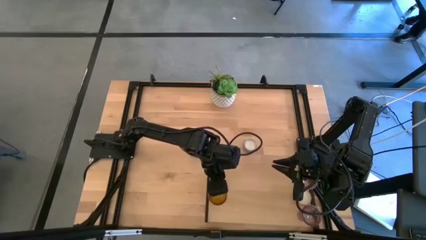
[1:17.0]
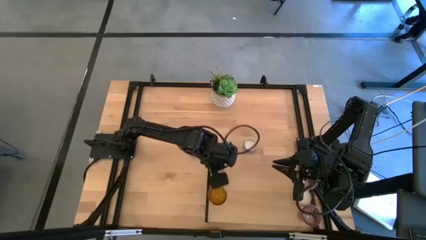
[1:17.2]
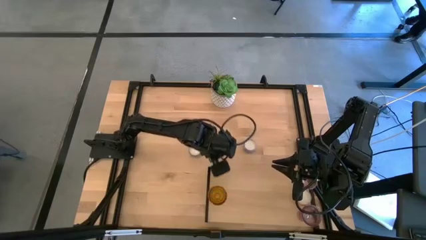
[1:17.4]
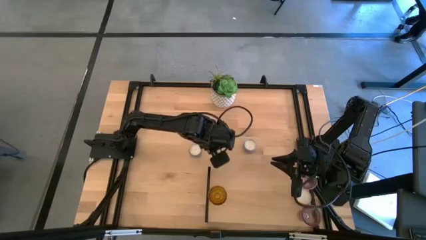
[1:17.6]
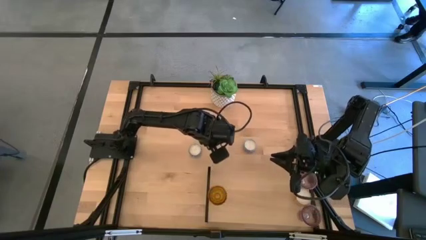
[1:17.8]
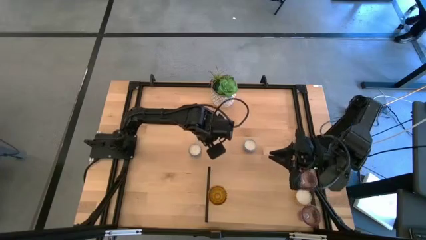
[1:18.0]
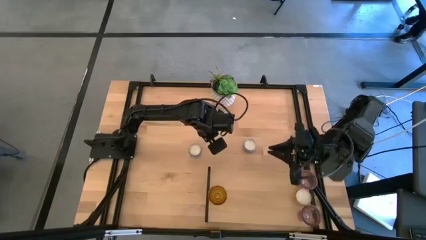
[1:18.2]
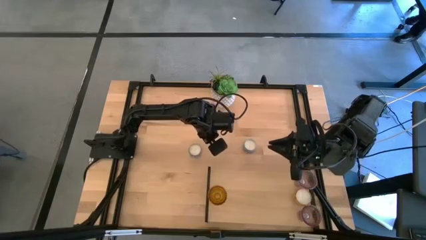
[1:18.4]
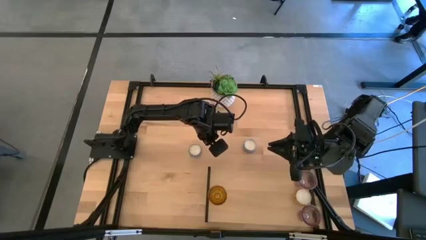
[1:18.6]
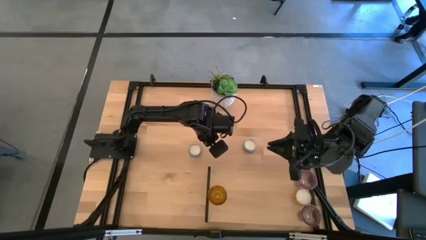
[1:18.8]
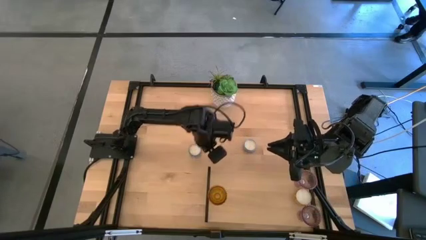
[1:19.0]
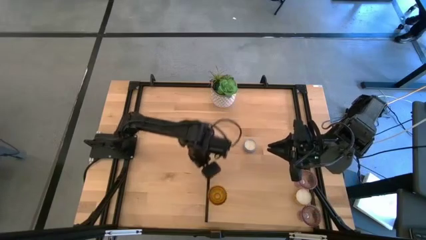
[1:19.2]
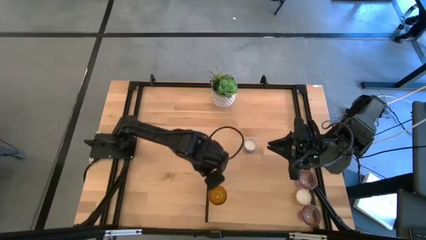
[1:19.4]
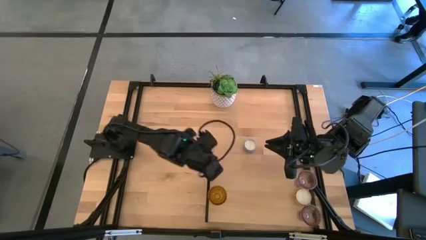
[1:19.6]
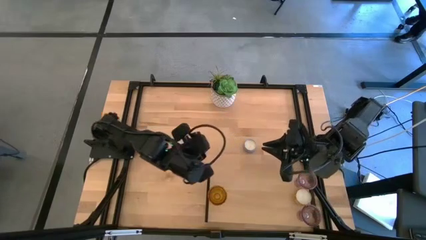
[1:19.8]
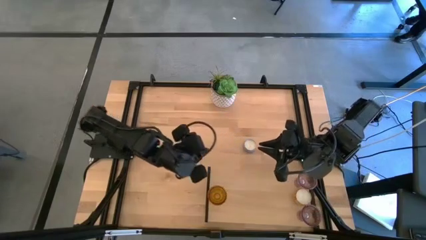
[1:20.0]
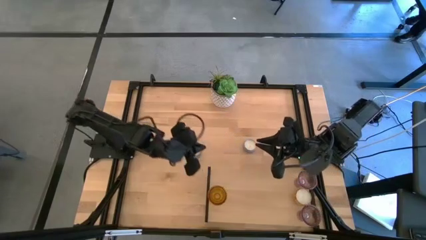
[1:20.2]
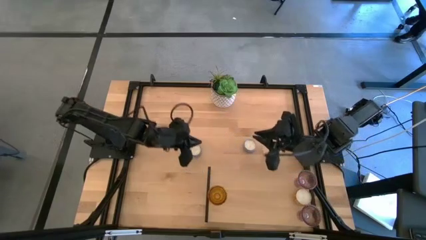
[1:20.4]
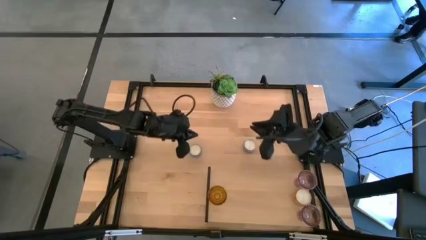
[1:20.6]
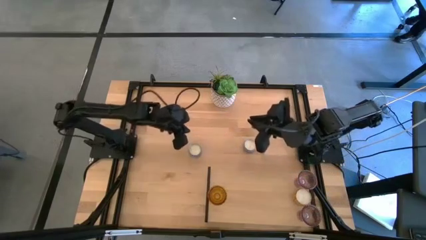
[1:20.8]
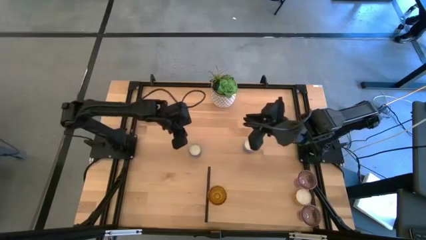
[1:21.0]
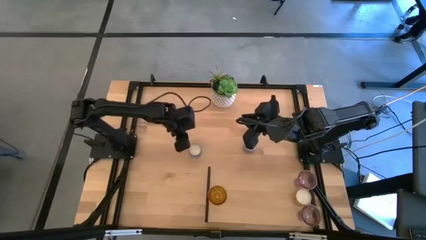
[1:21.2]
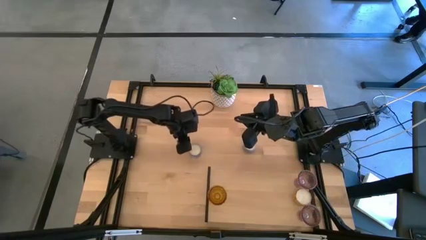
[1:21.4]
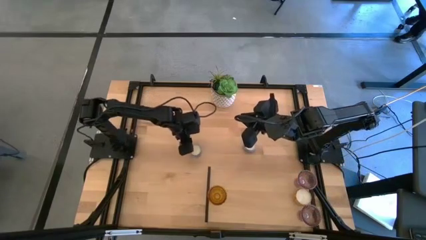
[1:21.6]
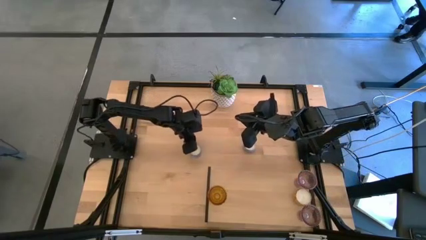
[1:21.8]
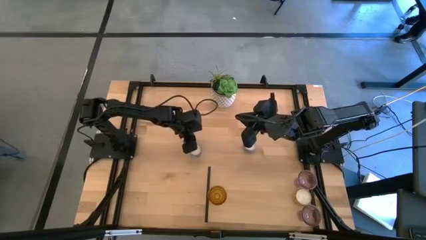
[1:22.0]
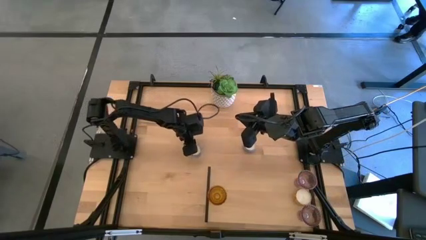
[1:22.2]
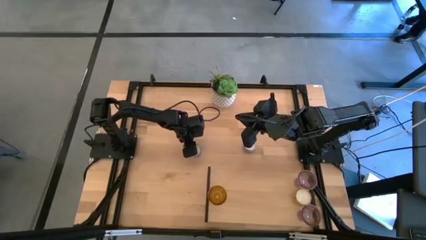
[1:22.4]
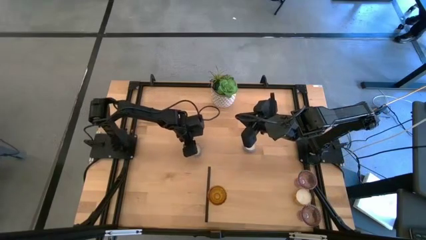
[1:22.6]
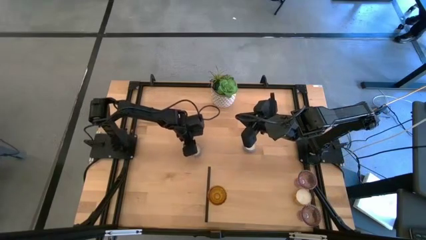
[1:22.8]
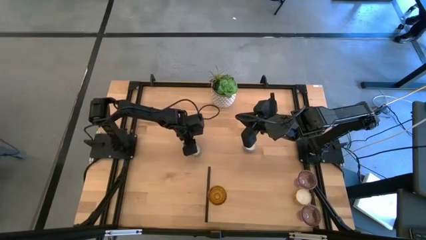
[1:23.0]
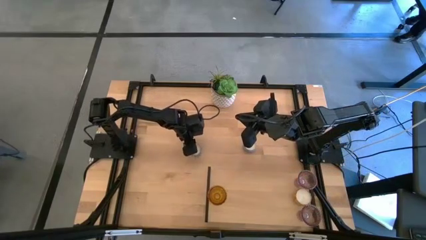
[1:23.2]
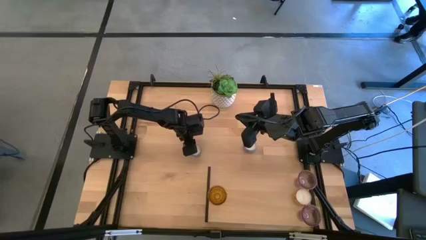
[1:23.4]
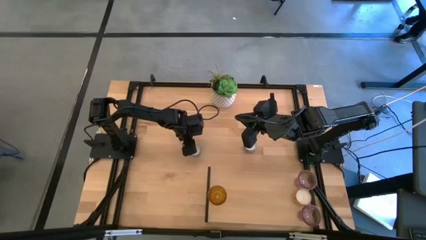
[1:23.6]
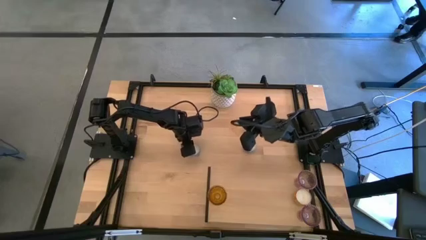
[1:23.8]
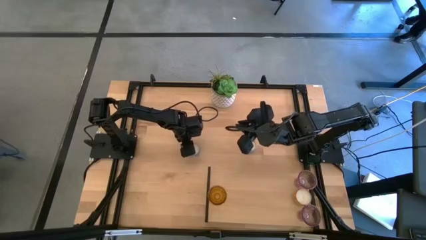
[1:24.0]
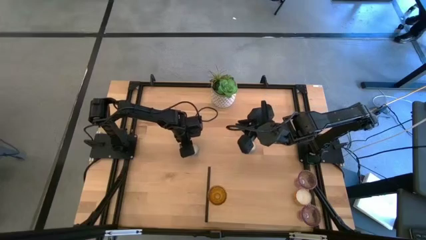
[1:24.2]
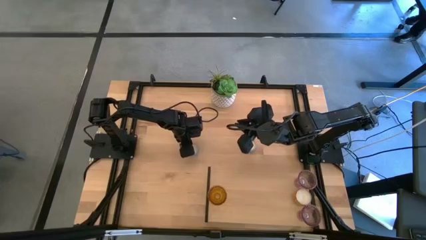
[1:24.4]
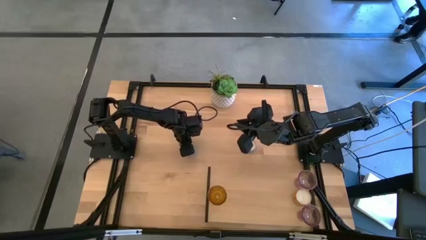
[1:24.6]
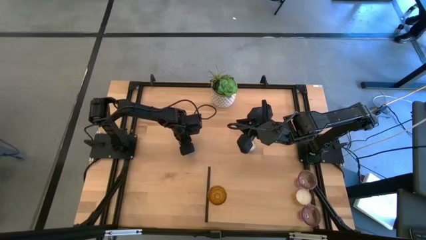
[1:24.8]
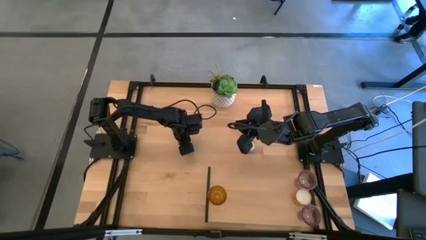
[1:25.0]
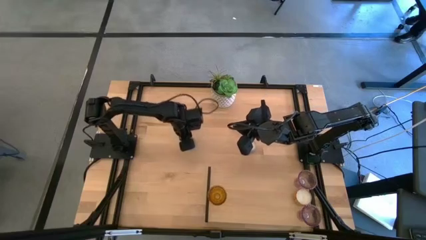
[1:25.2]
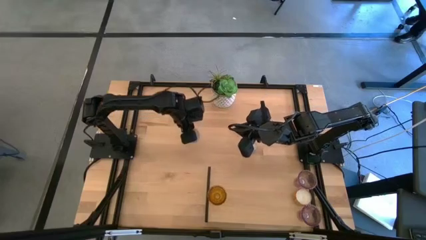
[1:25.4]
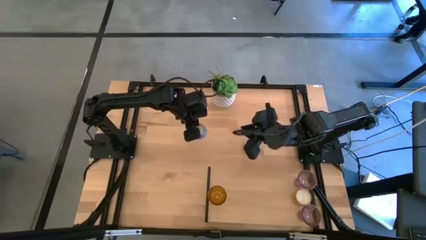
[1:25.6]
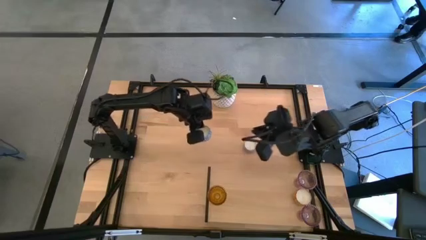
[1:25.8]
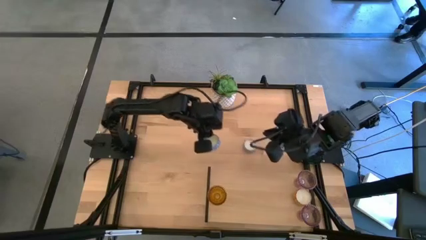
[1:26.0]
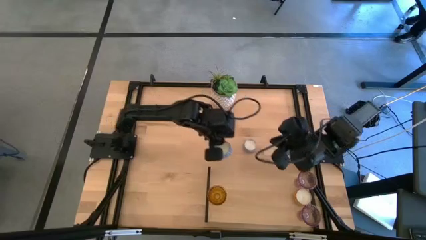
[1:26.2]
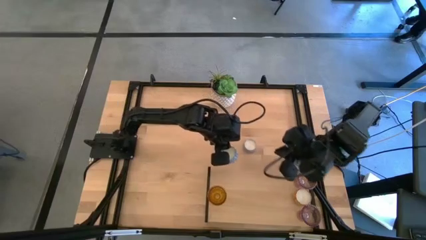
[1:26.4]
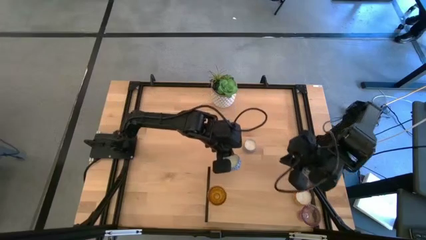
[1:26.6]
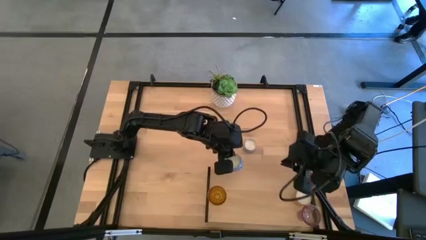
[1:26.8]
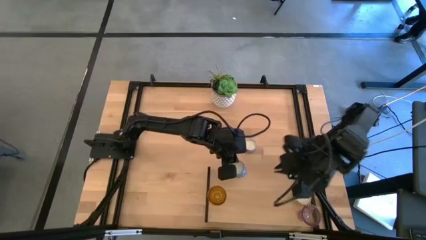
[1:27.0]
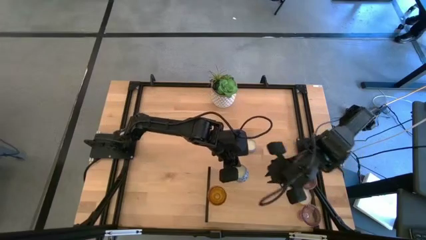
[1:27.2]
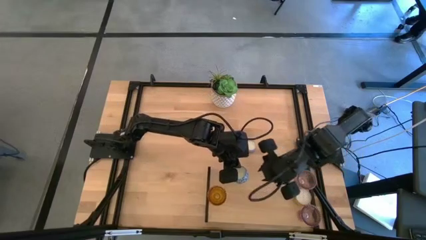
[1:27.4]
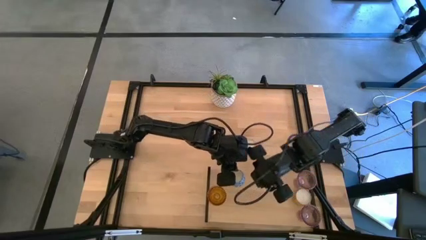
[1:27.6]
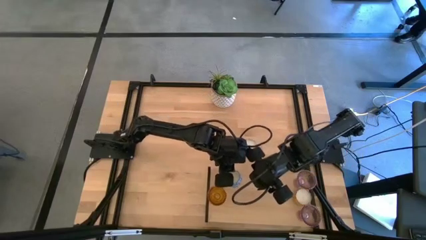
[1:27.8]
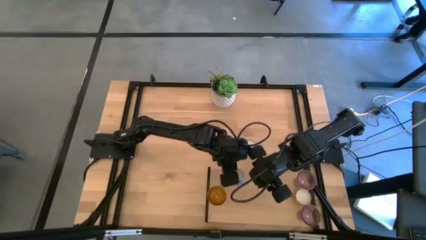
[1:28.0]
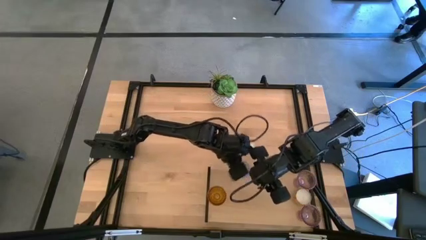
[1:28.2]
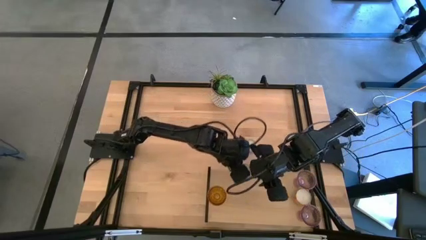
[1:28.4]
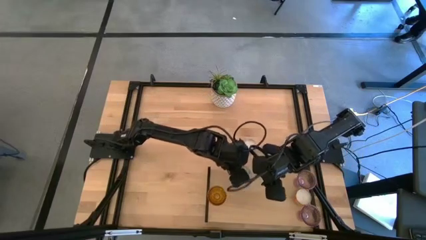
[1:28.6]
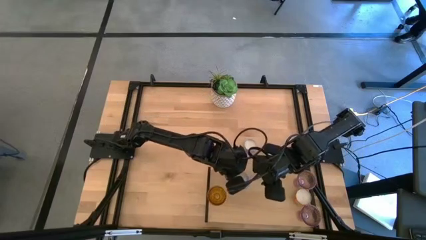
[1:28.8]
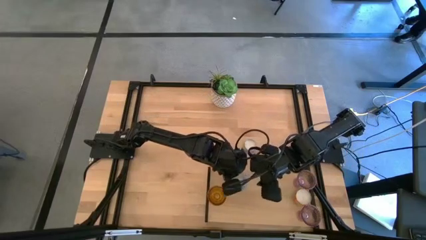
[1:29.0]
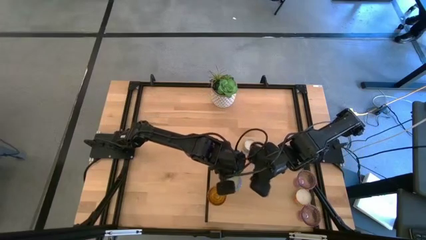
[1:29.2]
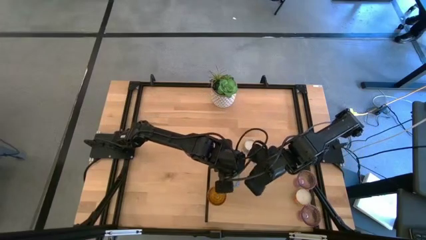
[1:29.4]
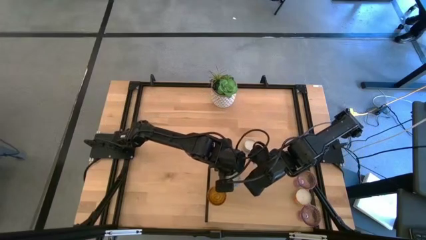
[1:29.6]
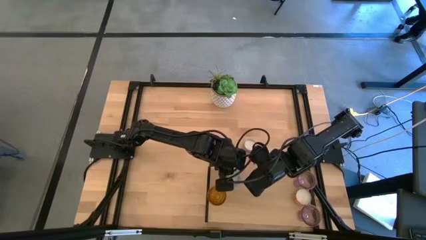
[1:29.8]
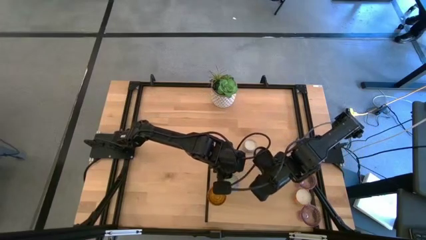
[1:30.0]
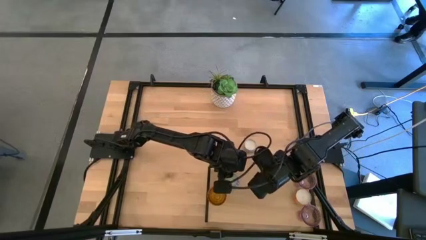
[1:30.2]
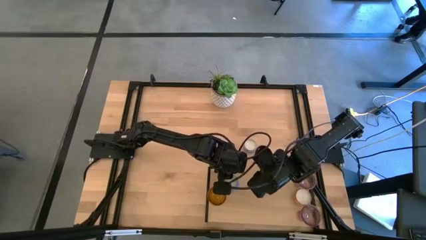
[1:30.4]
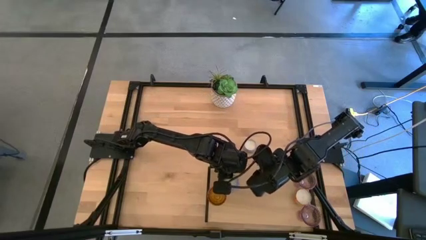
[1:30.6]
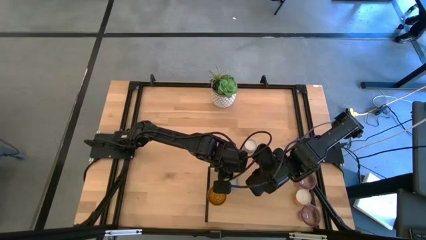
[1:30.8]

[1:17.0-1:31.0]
Task: Pick & Place candle stick holders
Put the dark blue scented candle on the shelf aligned with the yellow glass candle holder

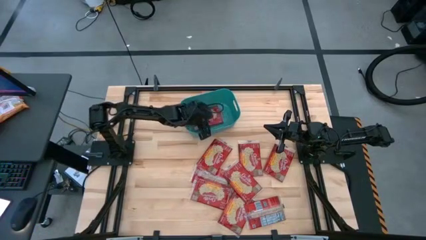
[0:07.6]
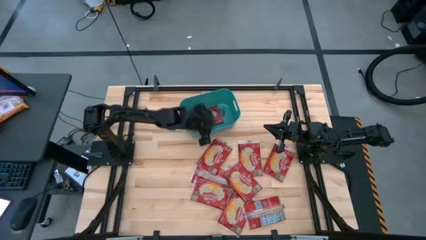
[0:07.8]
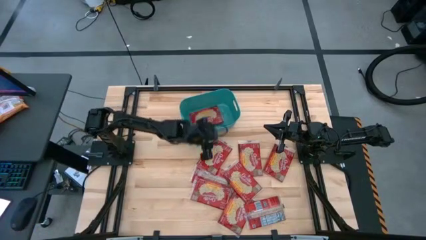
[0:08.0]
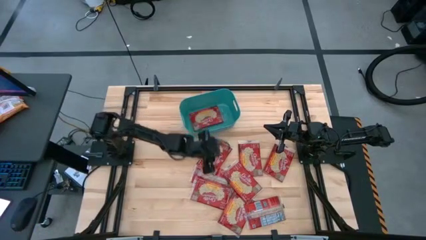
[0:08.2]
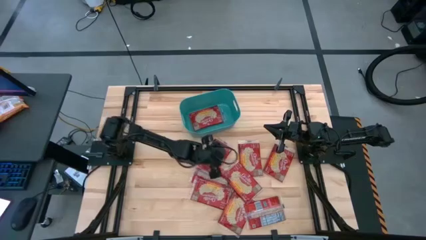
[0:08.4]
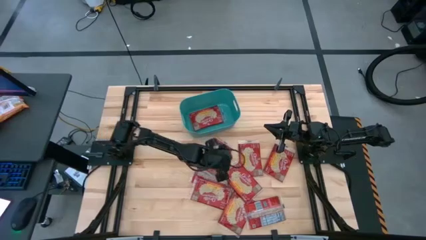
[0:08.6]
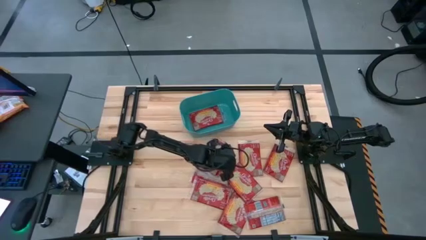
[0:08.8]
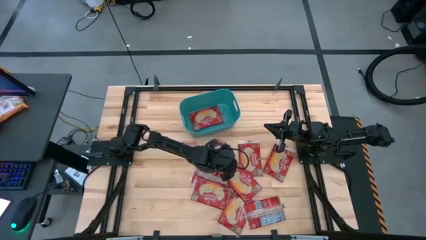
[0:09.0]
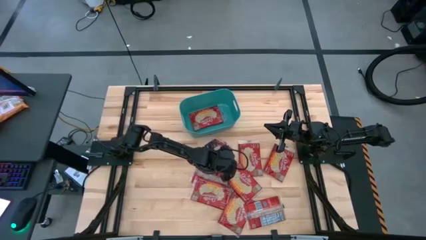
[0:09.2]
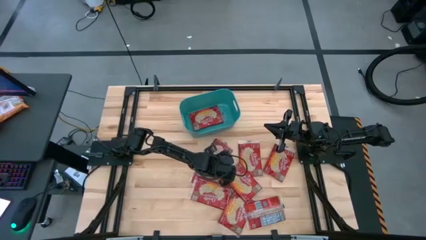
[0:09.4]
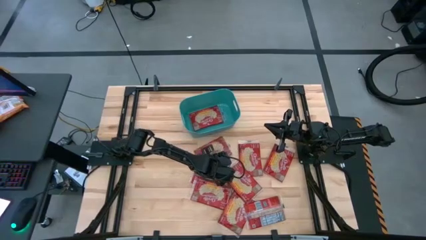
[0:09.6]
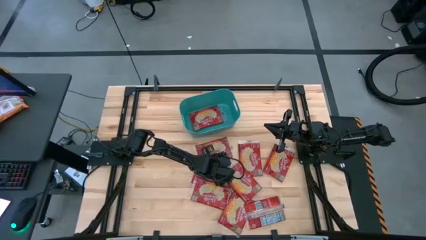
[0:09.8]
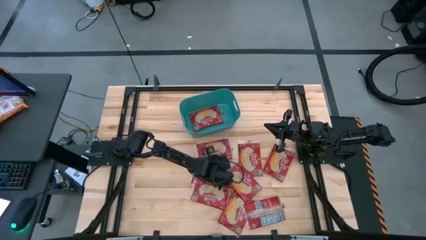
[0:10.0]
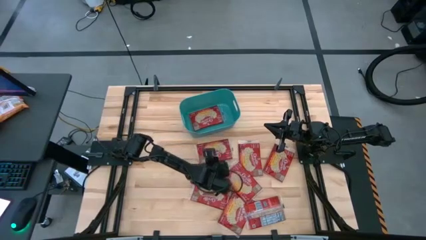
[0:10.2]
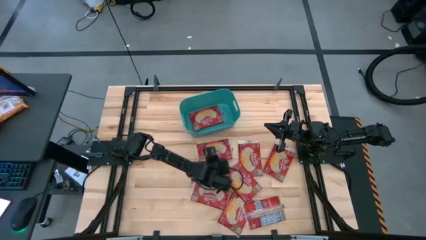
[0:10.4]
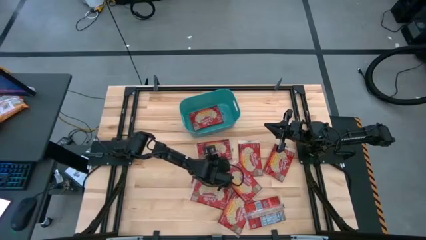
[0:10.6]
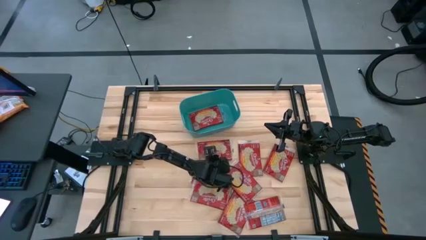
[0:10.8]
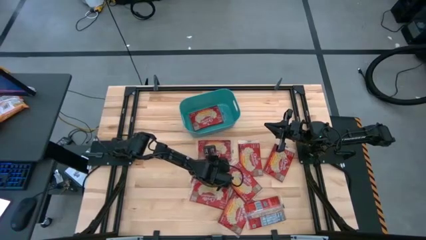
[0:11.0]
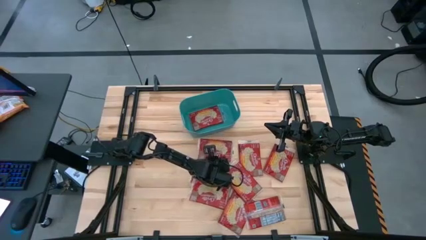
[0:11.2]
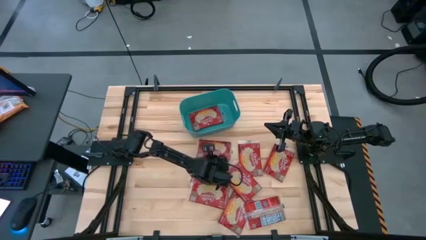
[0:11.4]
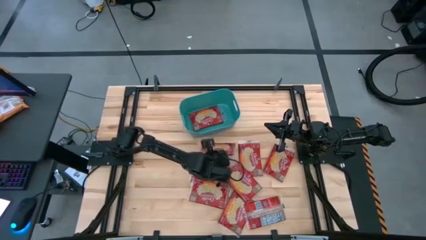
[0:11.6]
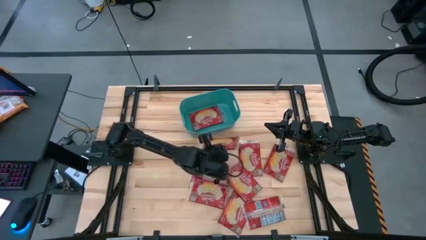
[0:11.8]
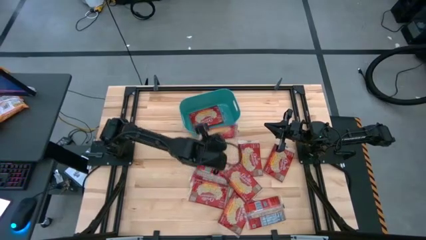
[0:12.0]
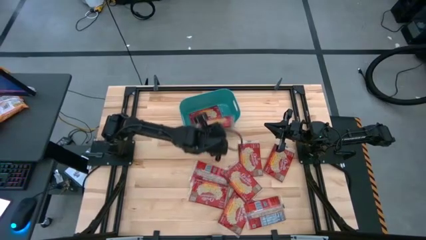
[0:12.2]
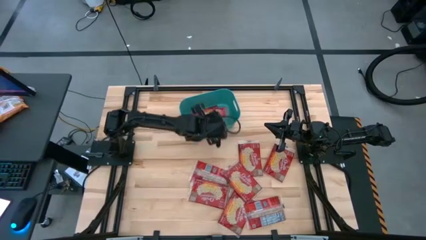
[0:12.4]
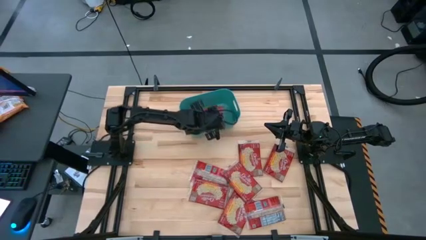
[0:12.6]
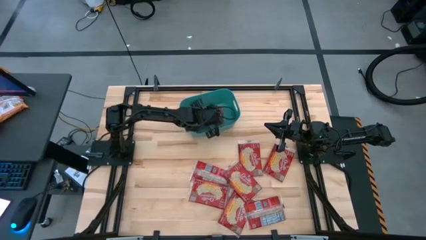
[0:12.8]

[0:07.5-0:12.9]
Task: Sort popcorn bags into baskets
Put the red popcorn bag into the green bin
